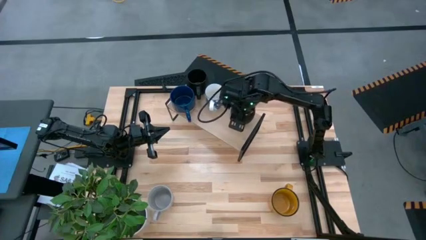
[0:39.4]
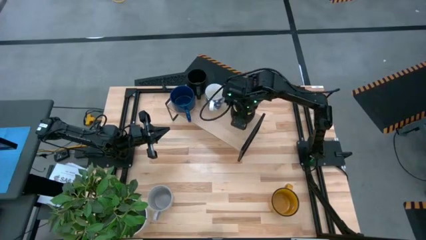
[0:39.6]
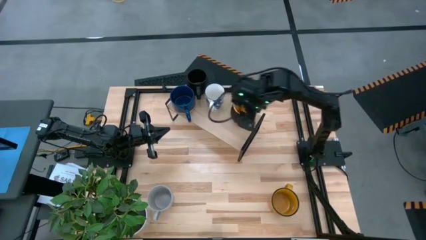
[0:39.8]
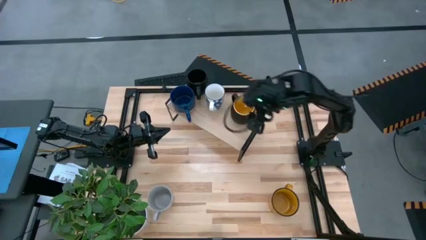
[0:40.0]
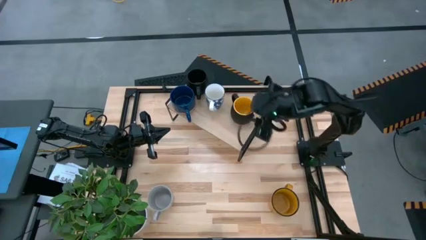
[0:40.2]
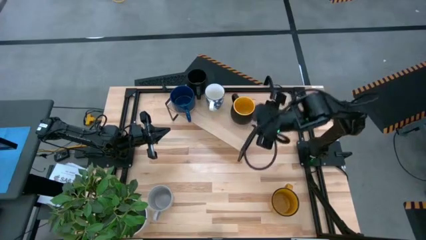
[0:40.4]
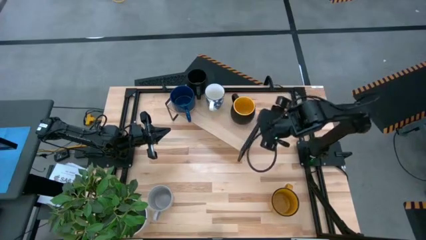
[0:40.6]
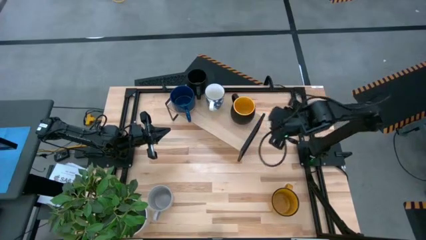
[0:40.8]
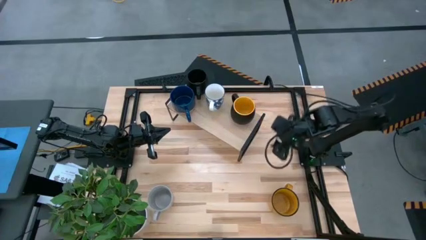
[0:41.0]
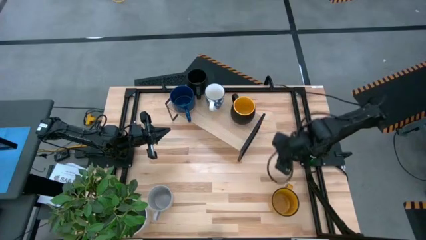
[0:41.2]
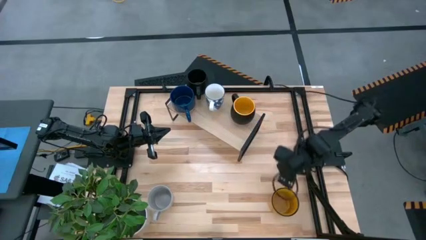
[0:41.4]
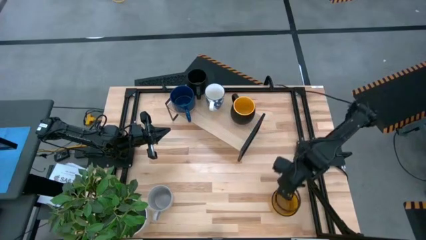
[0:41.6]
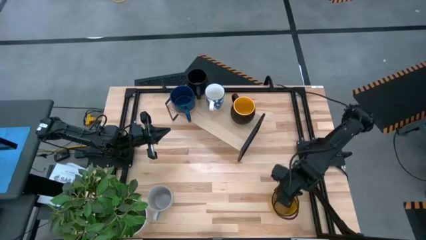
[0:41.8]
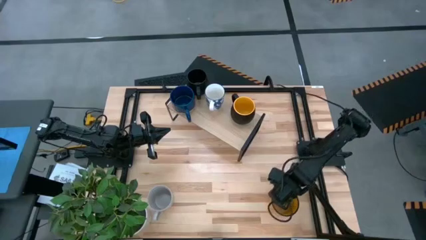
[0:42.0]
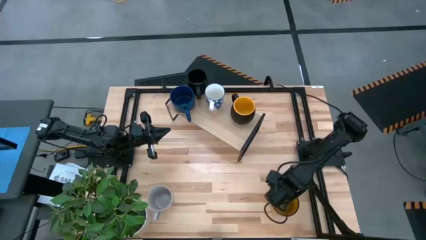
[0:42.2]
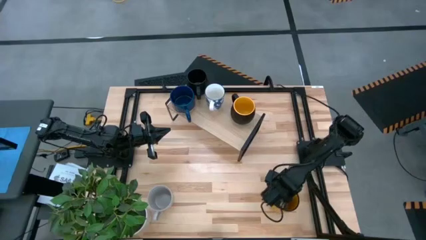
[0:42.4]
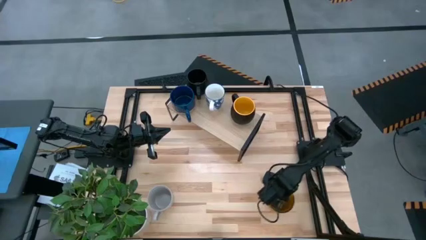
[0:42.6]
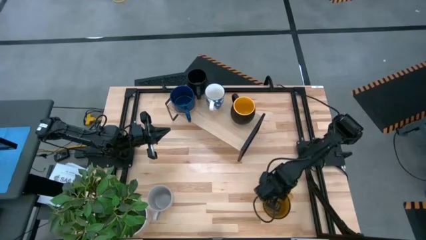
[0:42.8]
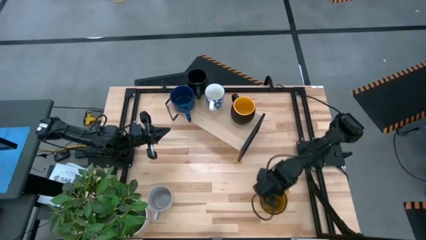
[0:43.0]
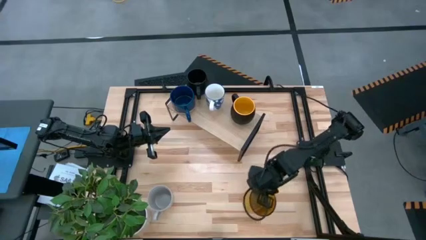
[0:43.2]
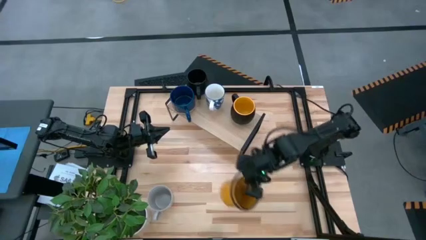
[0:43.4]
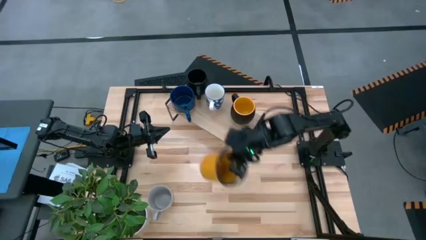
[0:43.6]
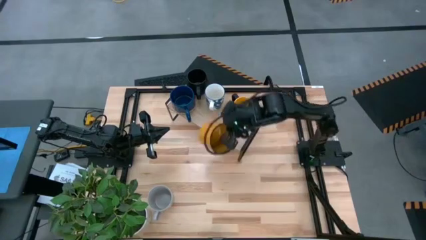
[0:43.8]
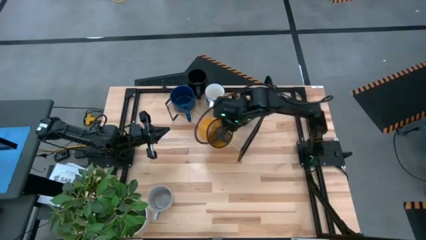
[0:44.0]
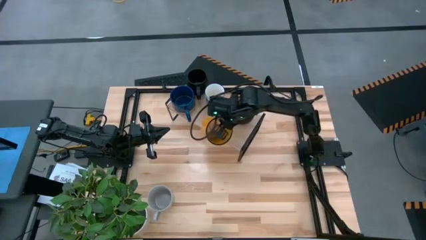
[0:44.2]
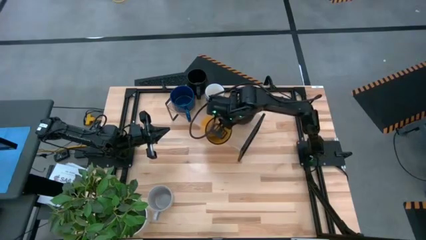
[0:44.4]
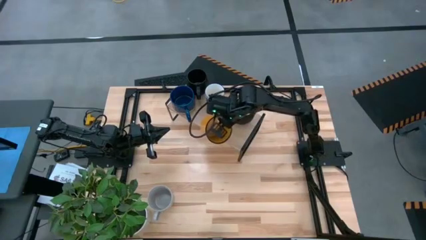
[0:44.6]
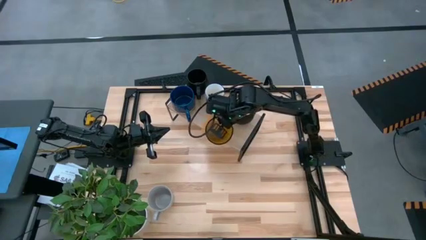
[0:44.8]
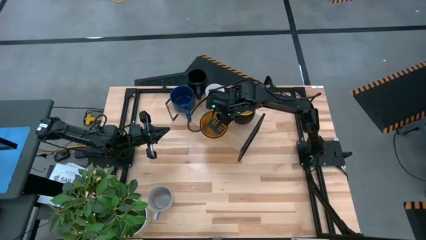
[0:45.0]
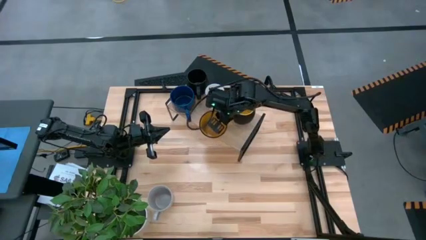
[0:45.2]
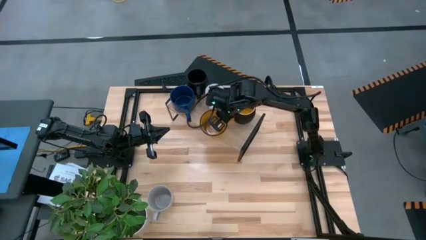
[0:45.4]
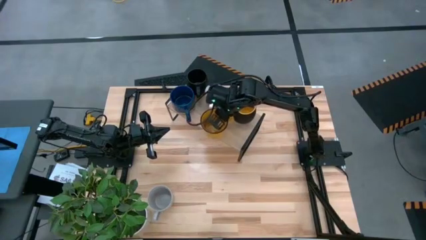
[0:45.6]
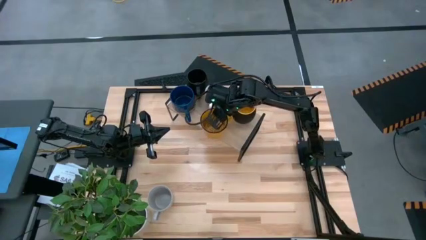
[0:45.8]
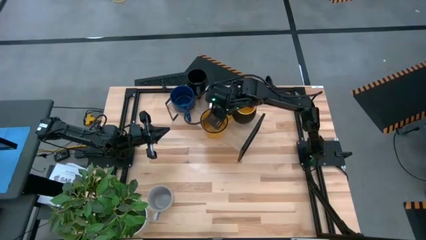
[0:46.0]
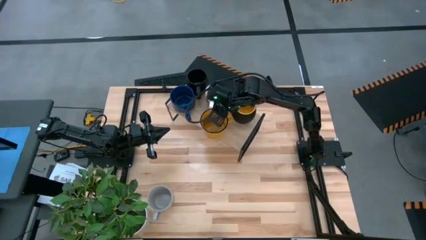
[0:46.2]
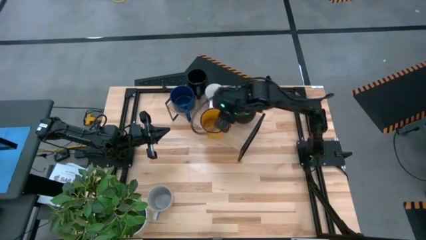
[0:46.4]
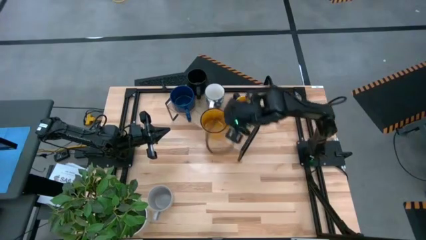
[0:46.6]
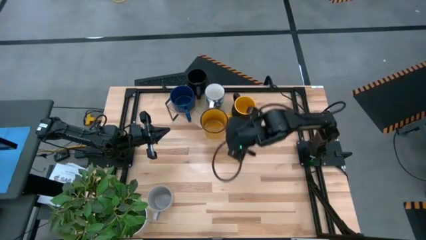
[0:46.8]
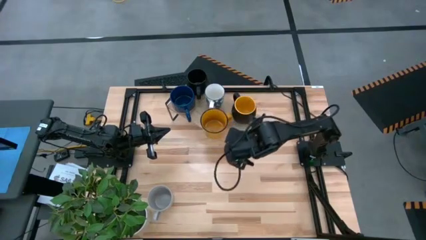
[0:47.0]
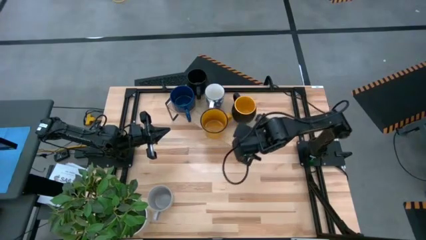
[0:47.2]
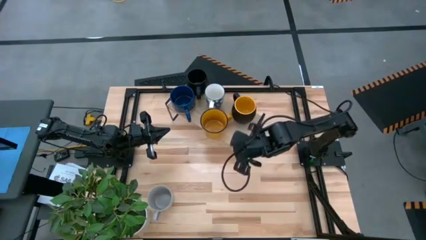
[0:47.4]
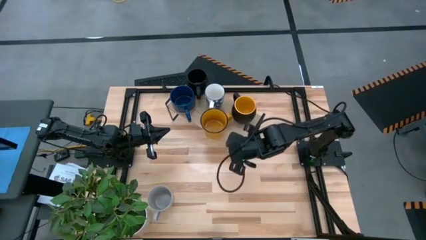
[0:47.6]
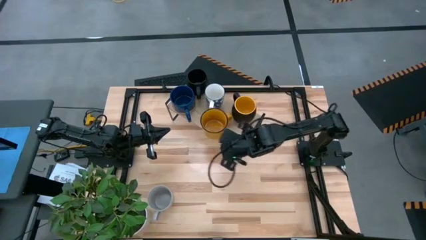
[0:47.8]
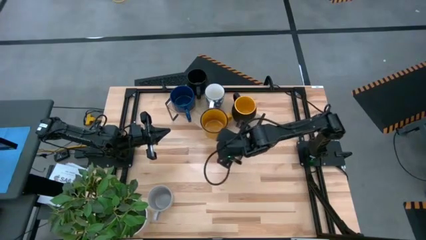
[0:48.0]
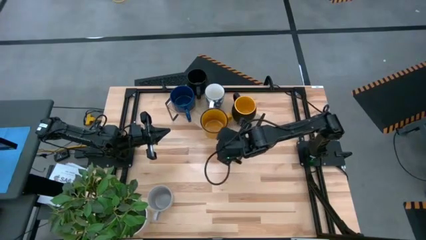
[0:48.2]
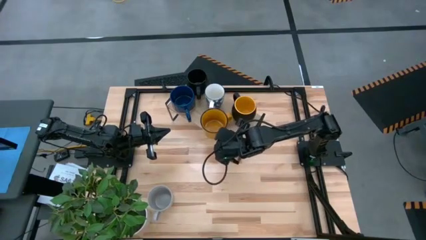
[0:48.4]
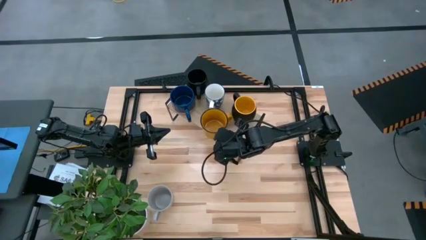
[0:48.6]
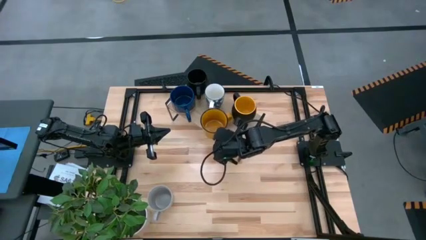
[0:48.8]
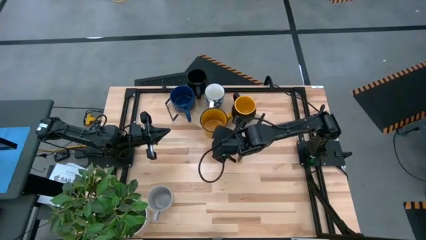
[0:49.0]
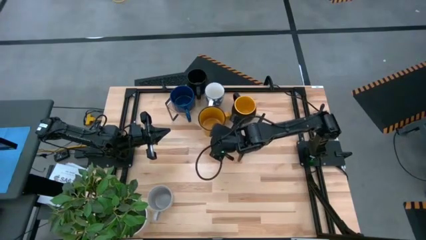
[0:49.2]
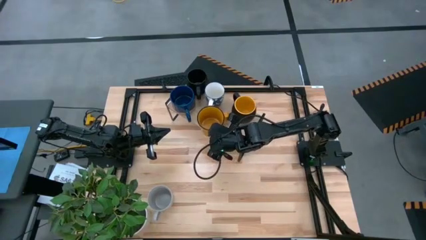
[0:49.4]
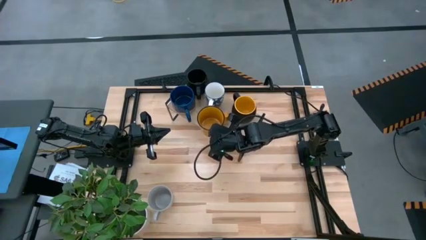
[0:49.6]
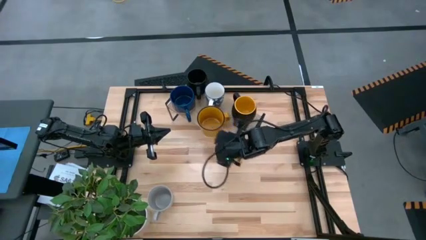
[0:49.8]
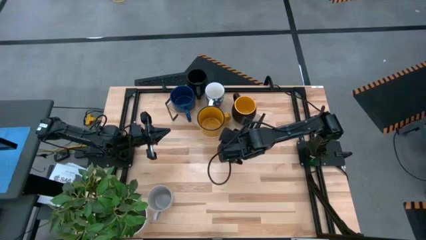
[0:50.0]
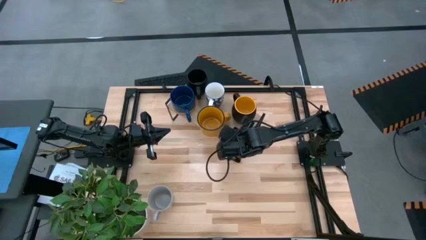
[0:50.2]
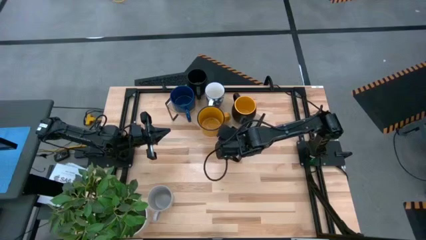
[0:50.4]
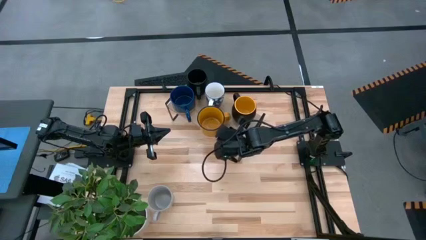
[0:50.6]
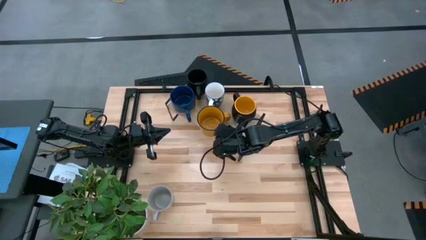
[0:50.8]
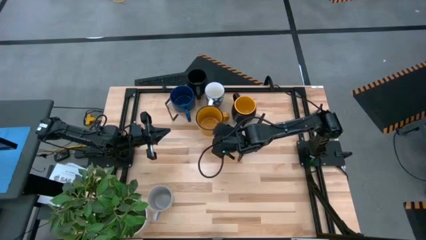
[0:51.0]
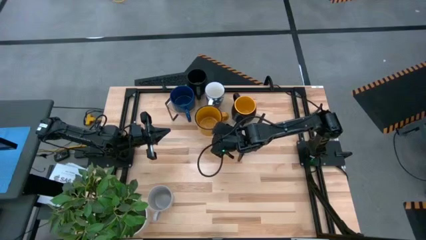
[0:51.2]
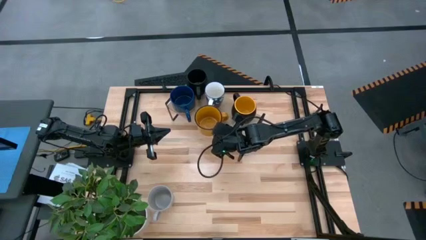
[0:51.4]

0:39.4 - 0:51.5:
Task: Place coffee mugs
Put the yellow mug on the shelf

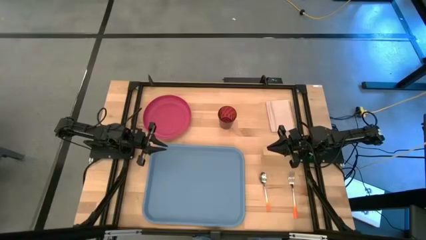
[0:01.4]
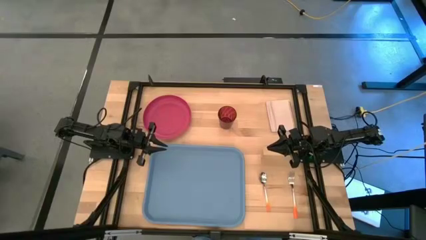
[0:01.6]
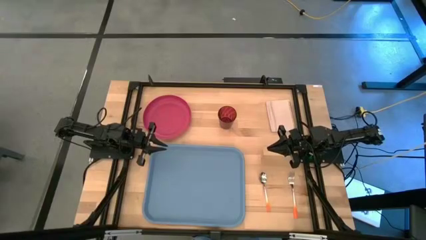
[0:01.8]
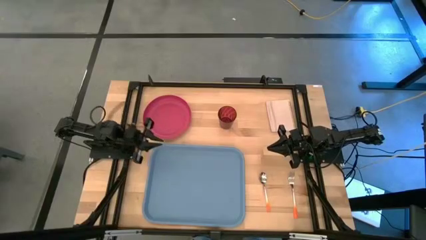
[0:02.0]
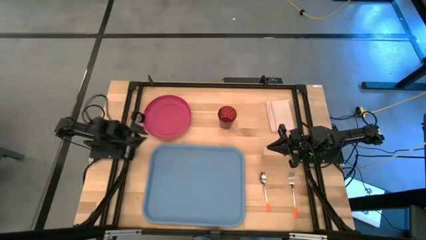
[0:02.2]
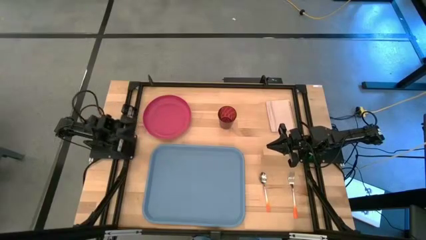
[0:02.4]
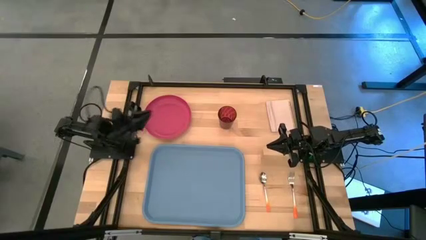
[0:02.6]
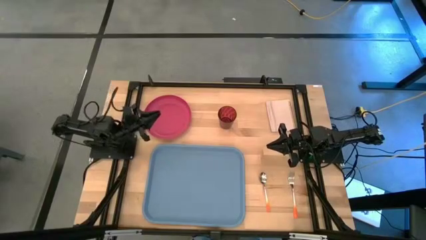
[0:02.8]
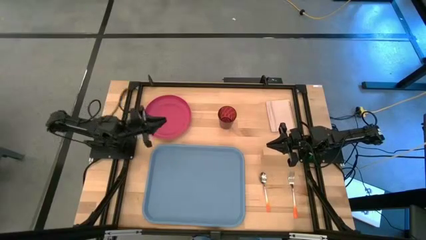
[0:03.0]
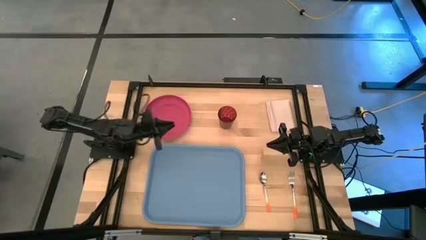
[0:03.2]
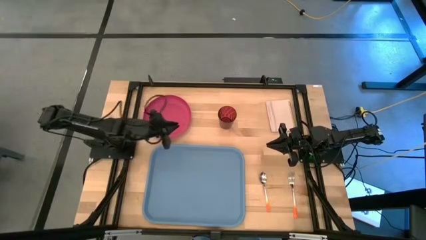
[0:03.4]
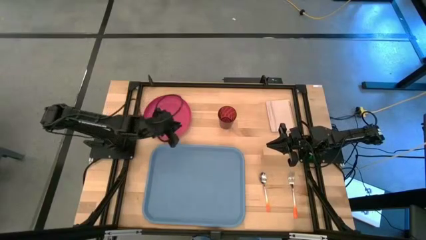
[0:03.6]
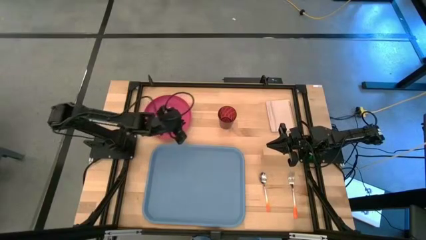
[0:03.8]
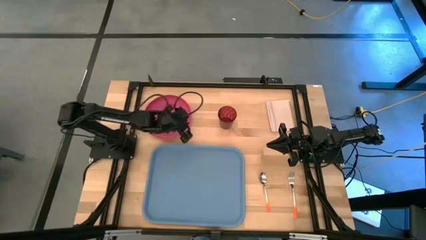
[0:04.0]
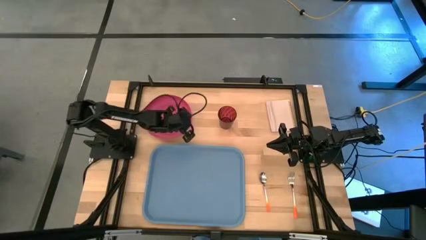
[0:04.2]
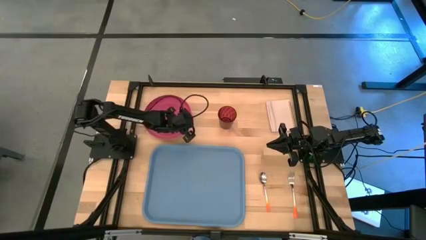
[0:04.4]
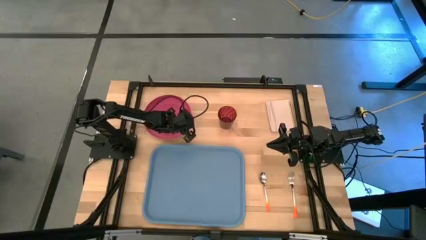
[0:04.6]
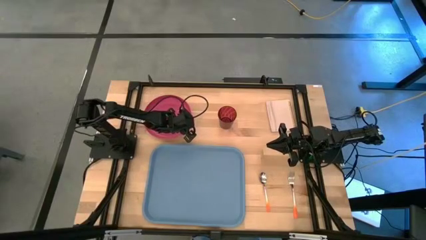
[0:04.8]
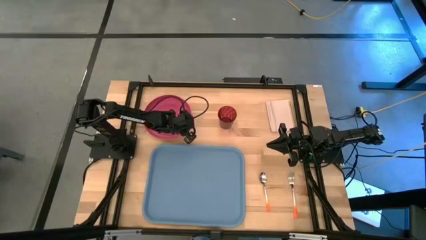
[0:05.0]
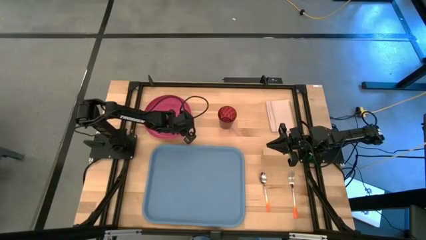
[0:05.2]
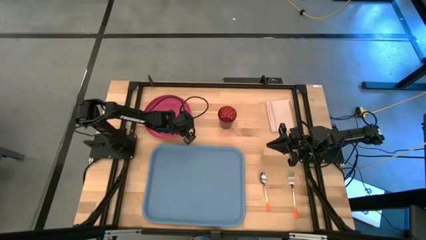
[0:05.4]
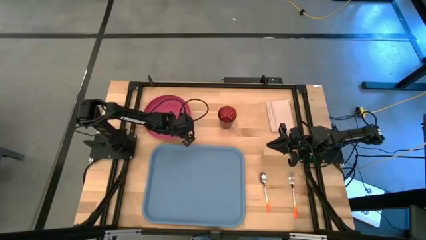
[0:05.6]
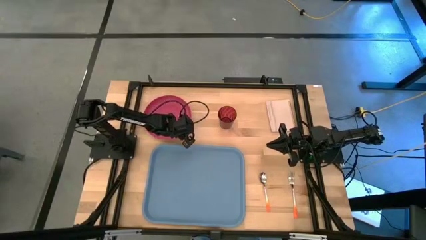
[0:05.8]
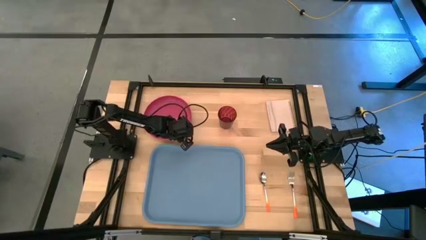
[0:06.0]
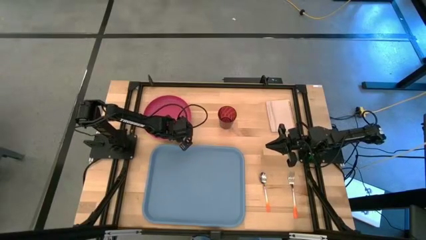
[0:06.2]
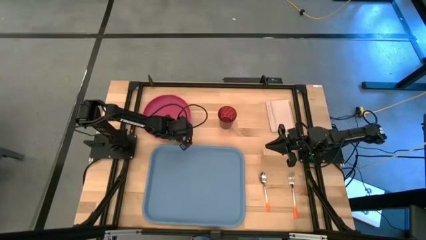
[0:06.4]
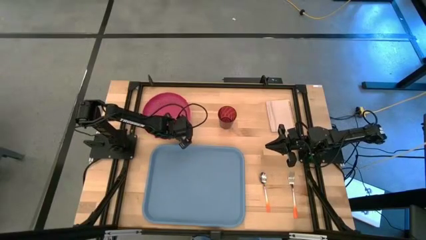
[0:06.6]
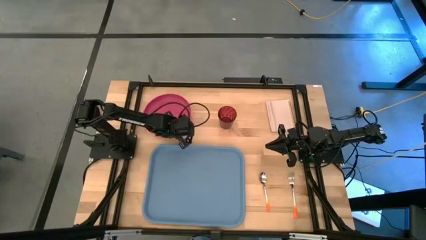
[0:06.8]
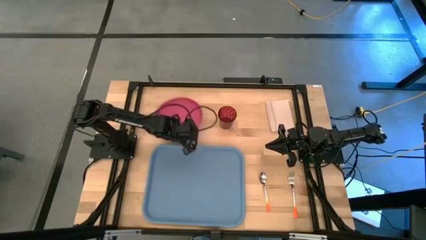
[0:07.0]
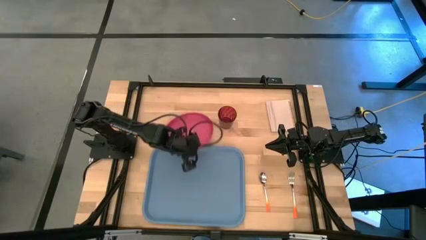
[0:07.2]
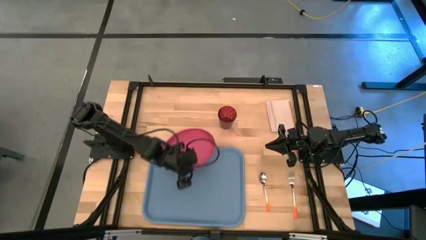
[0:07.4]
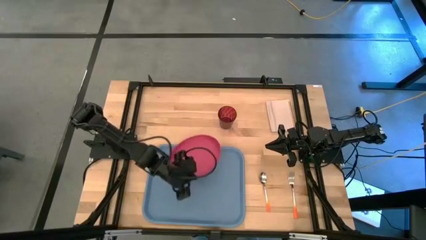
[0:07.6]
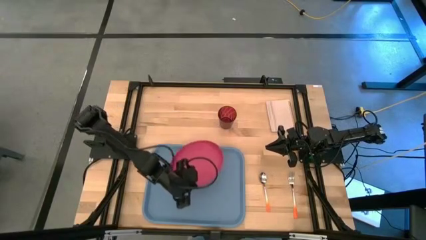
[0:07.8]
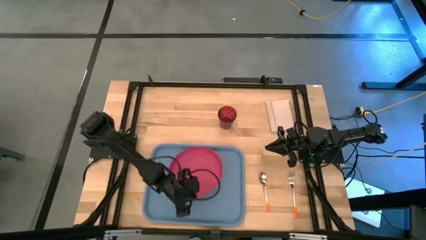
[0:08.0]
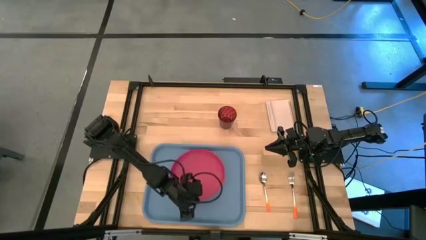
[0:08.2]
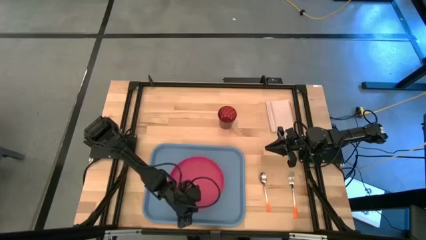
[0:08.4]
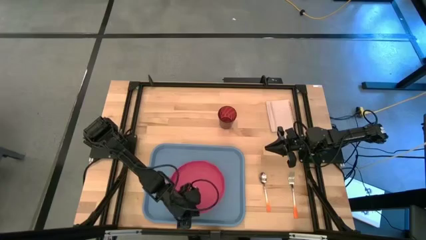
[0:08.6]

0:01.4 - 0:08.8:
Task: Pick and place plate/cup/fork/spoon on tray
Put the pink plate on the blue serving tray
